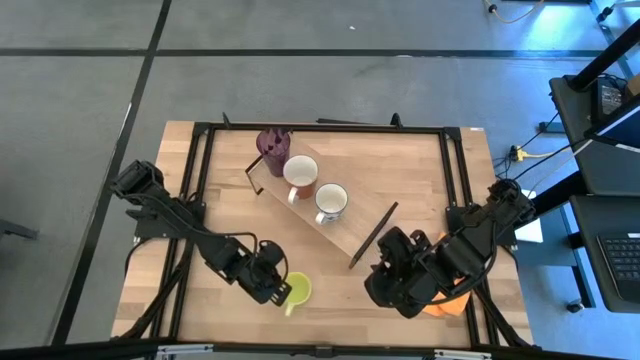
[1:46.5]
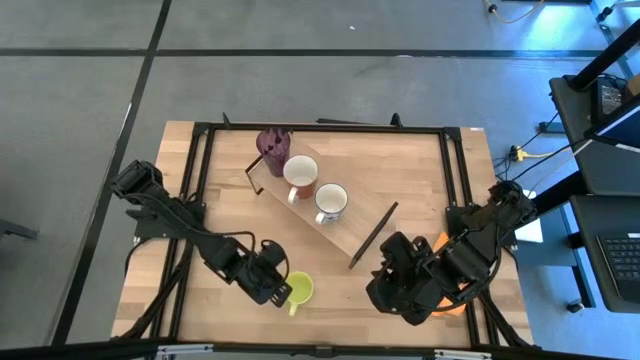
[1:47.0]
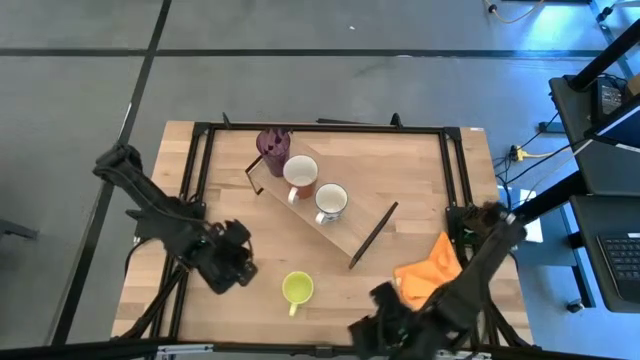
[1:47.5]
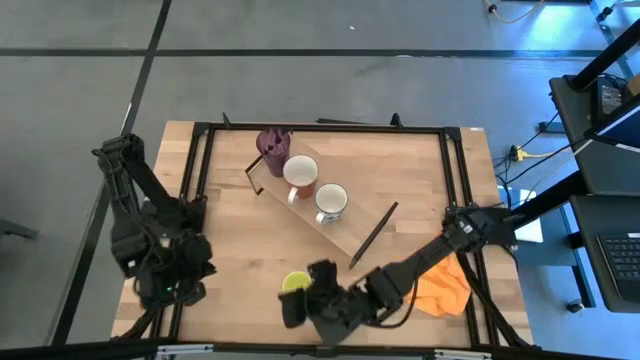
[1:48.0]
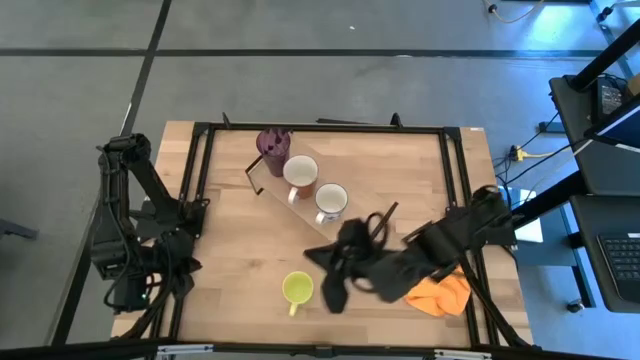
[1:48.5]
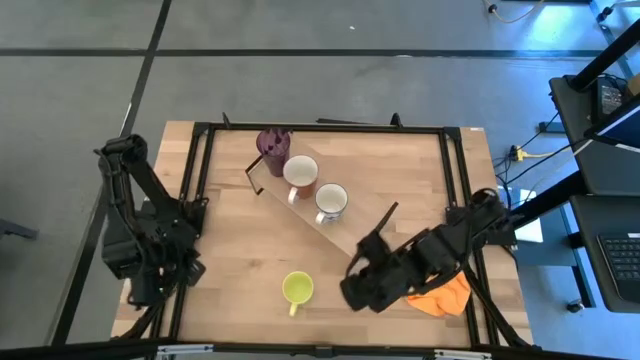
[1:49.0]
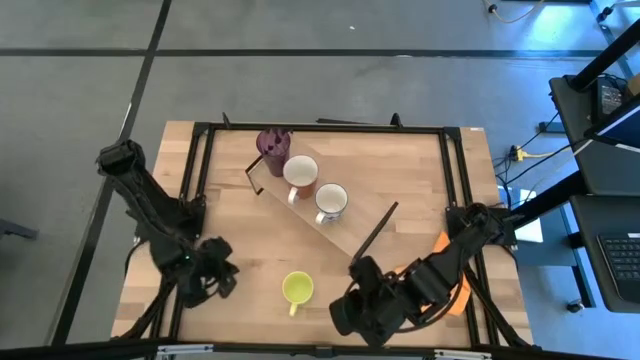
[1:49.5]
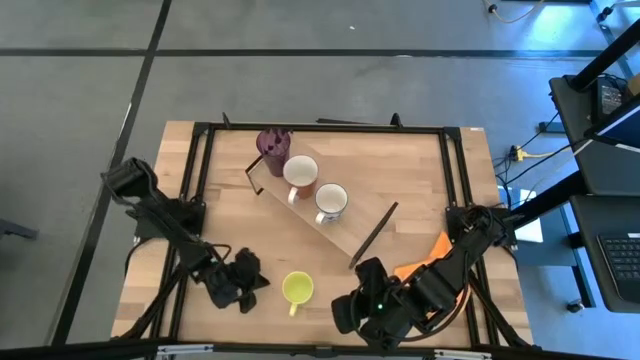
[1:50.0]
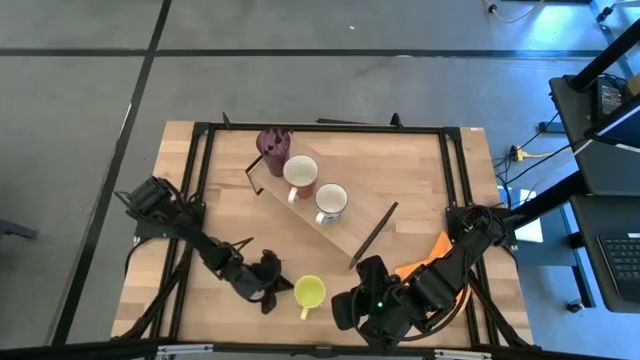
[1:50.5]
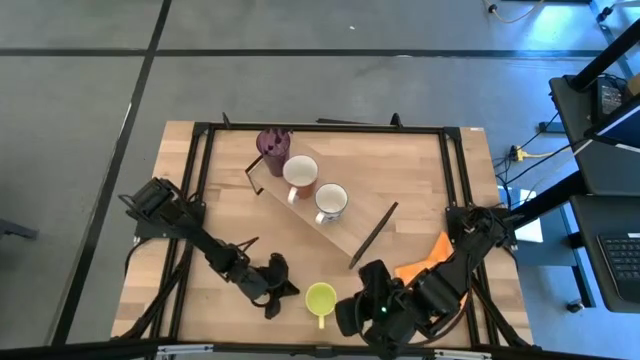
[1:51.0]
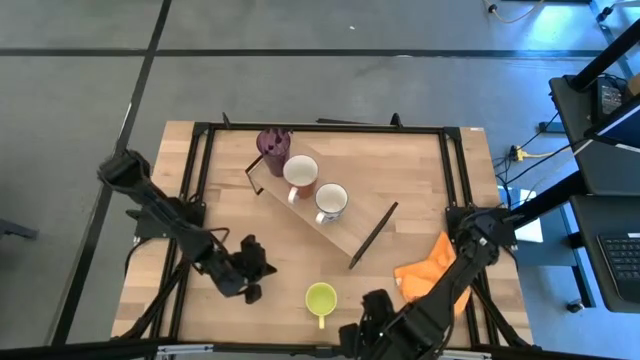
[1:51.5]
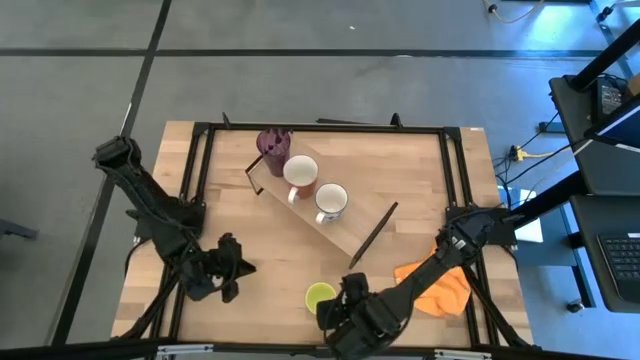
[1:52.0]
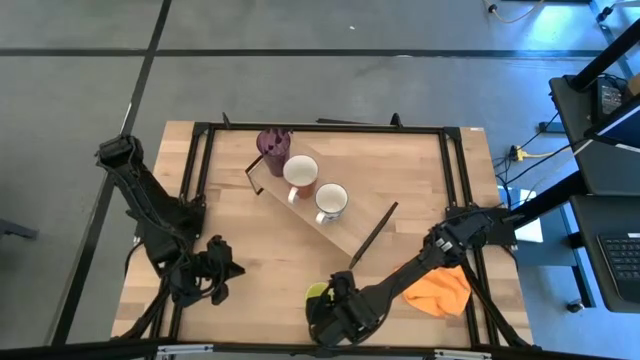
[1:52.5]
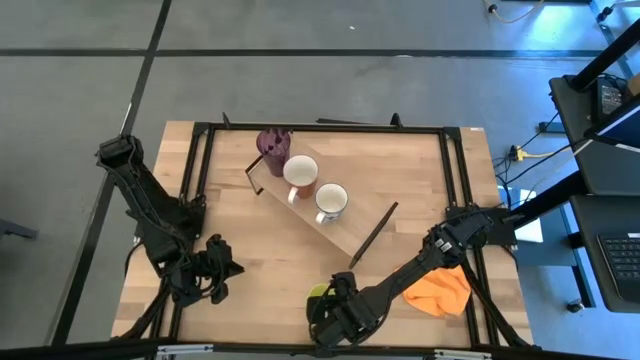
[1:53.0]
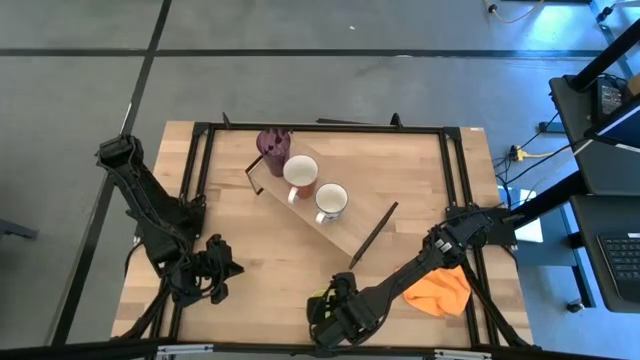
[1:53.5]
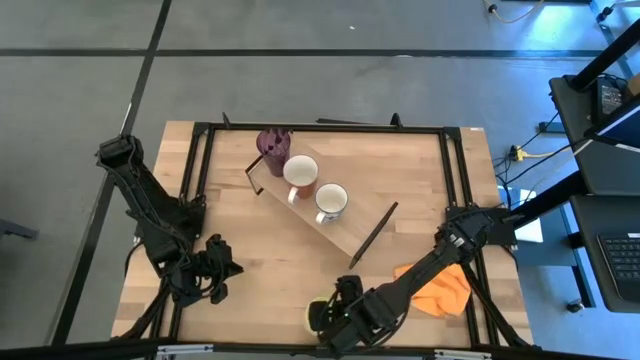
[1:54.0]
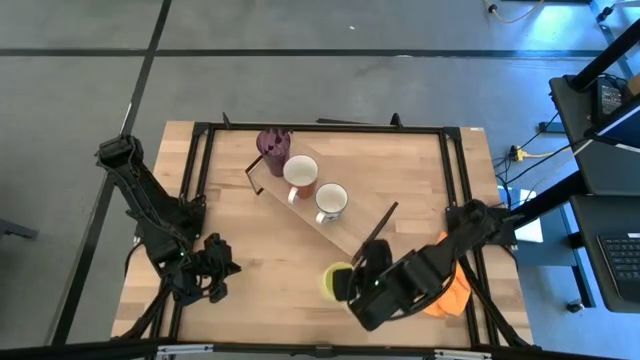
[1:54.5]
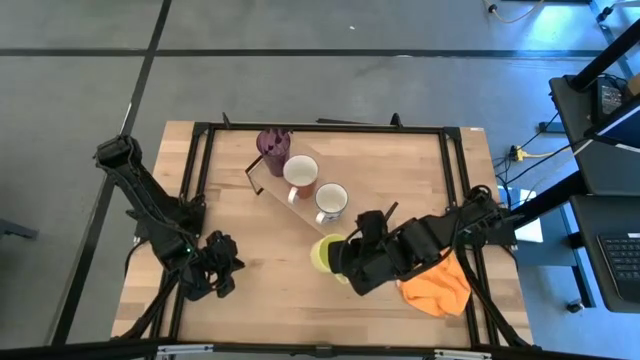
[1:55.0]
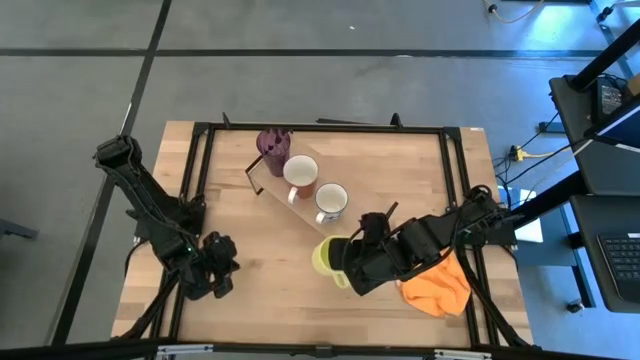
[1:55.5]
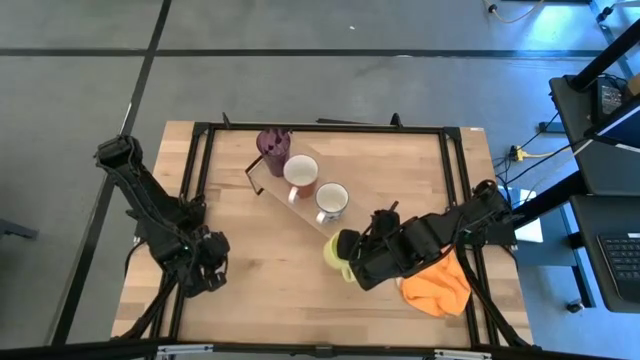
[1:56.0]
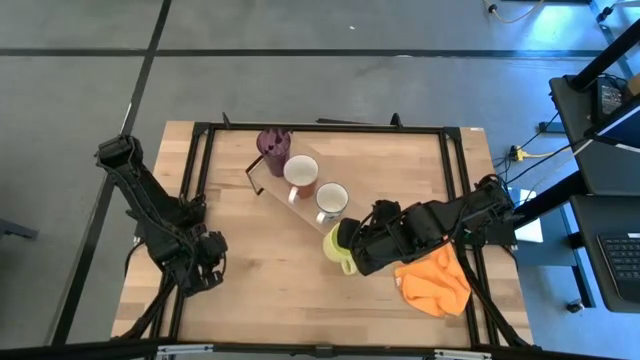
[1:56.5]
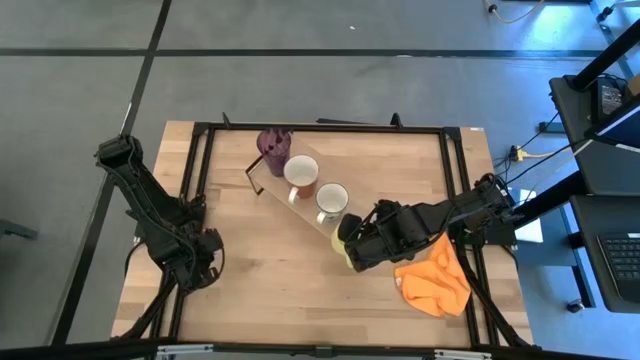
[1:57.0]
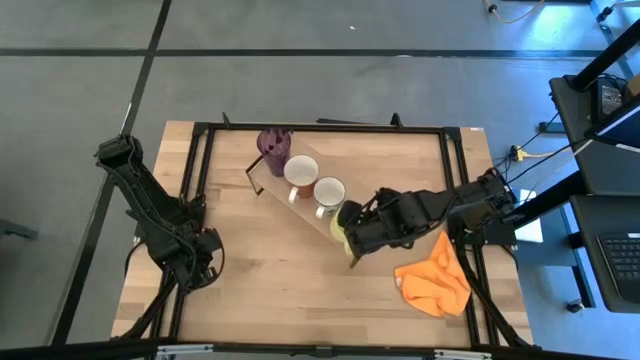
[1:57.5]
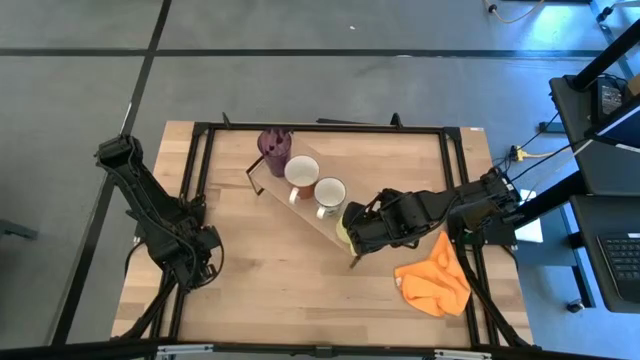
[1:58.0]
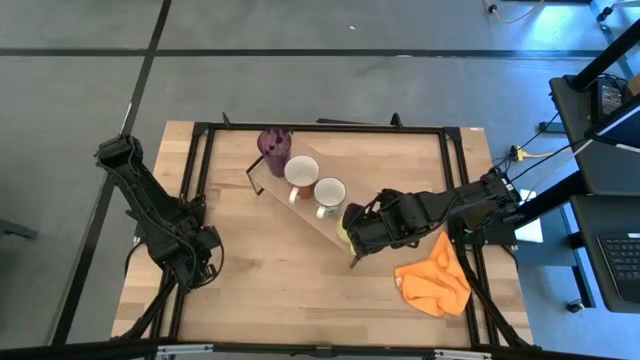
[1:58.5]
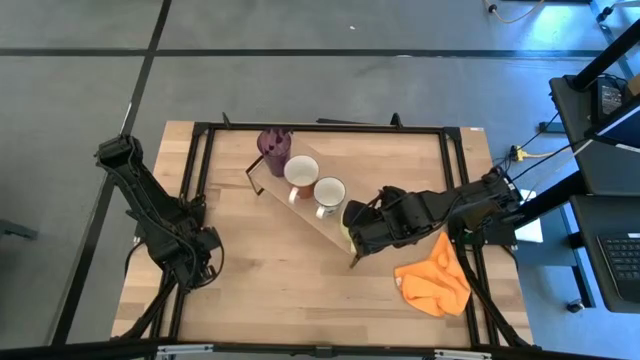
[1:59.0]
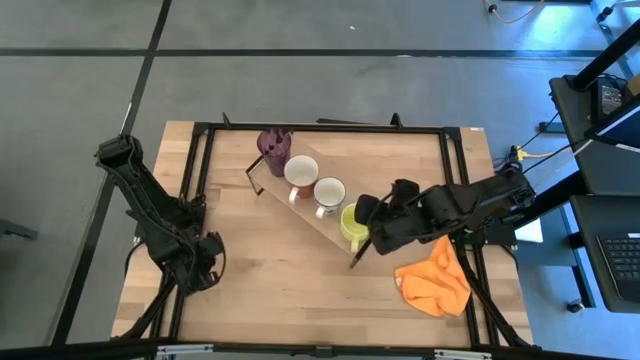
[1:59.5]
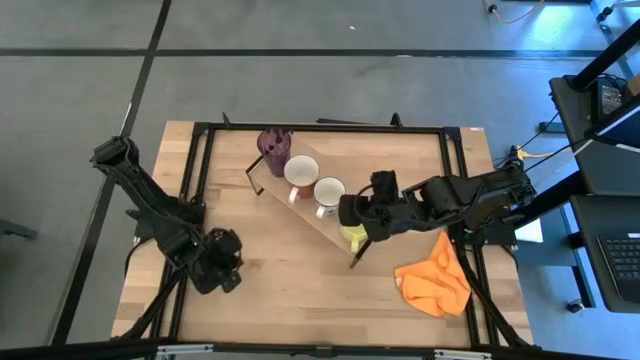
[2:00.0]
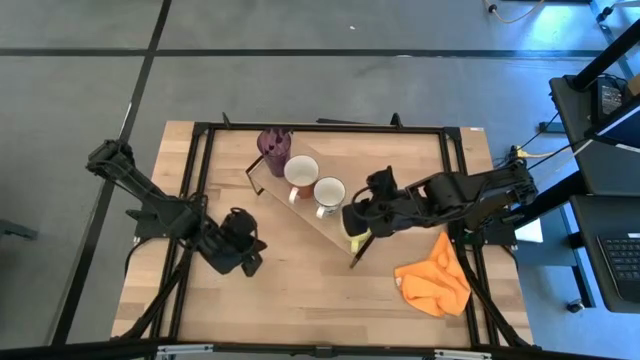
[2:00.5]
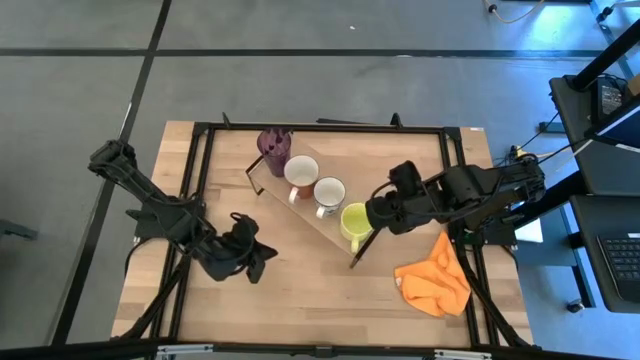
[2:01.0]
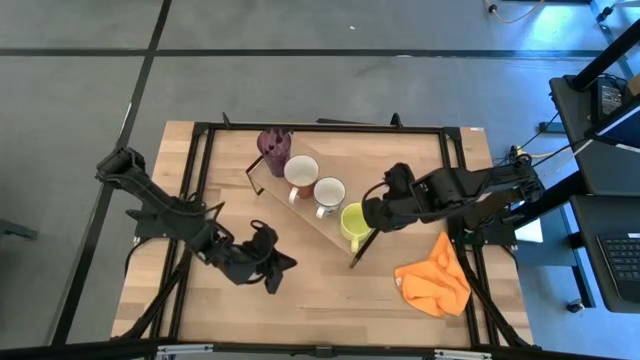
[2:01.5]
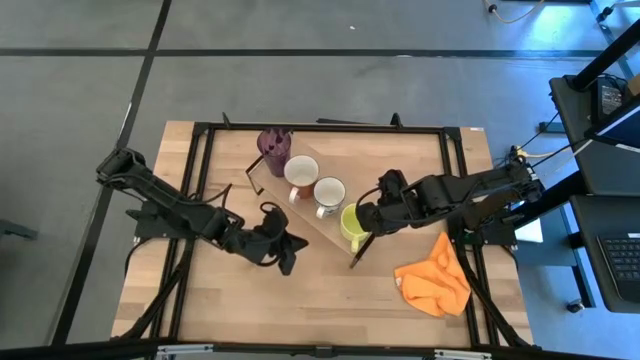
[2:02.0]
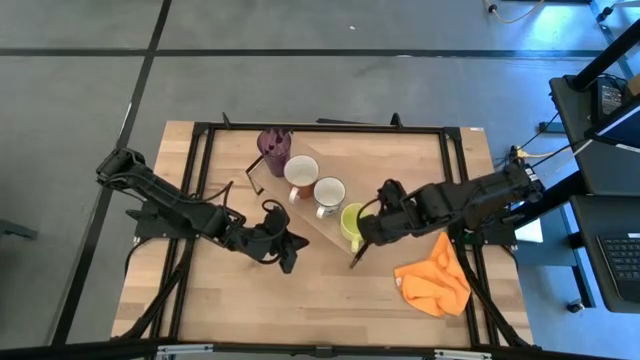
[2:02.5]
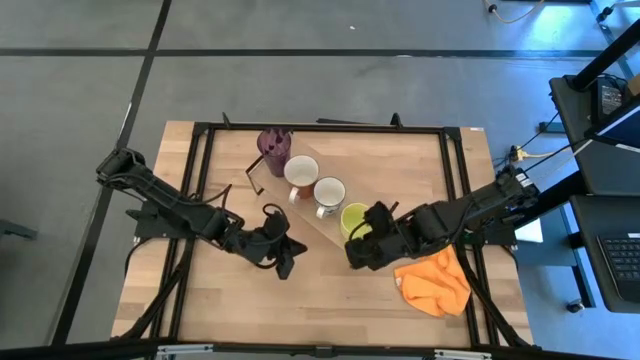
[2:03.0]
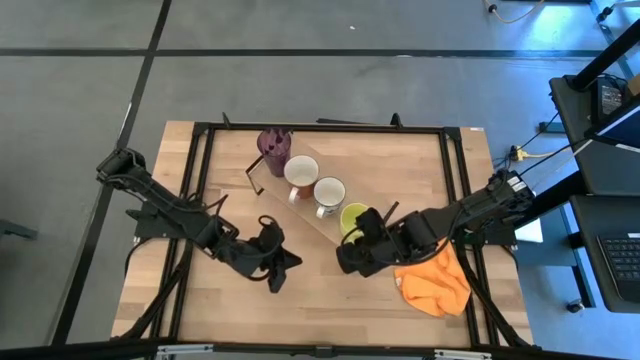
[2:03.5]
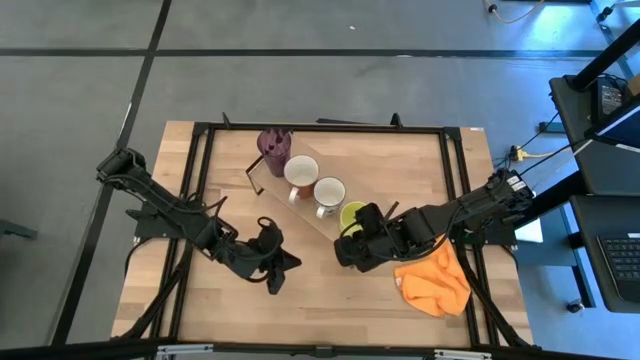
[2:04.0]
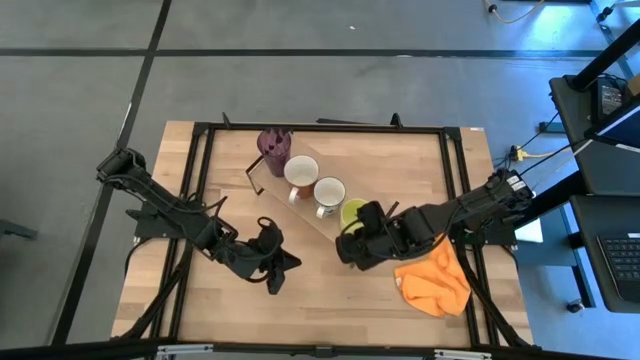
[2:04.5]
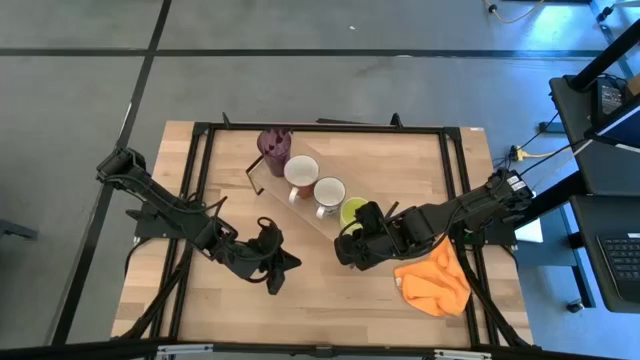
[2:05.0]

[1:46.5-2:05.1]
Task: Stack small to large cups/mugs on shelf
Put the yellow mug on the shelf

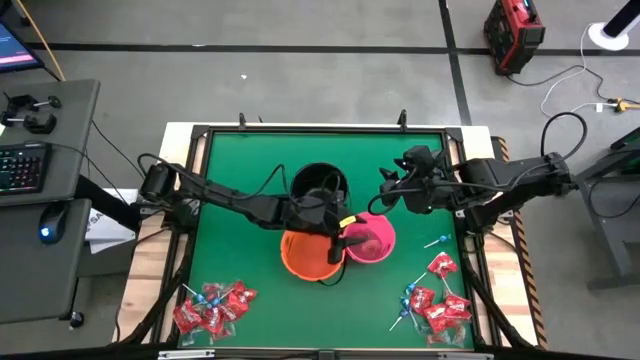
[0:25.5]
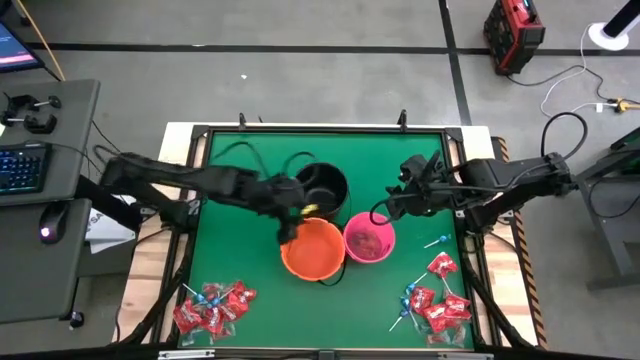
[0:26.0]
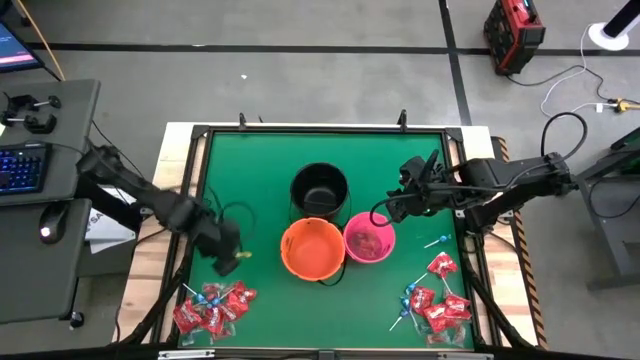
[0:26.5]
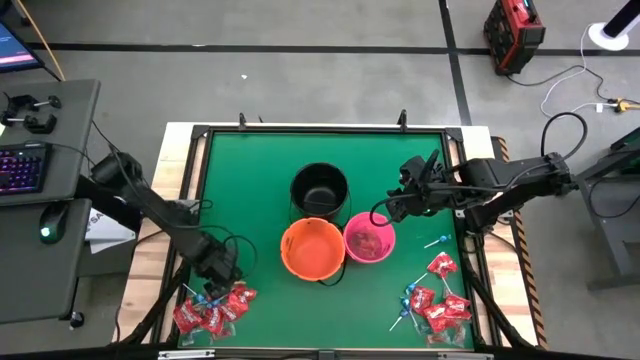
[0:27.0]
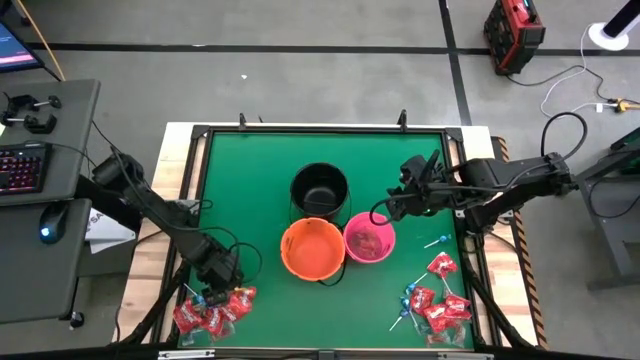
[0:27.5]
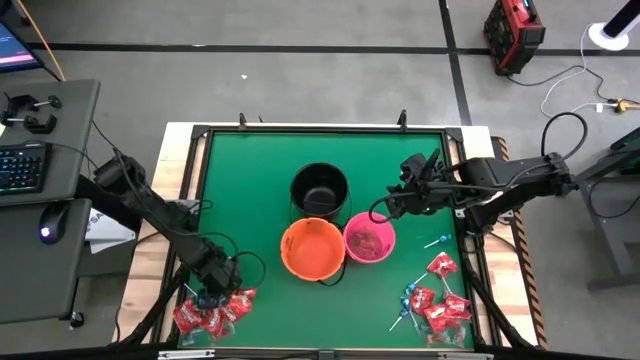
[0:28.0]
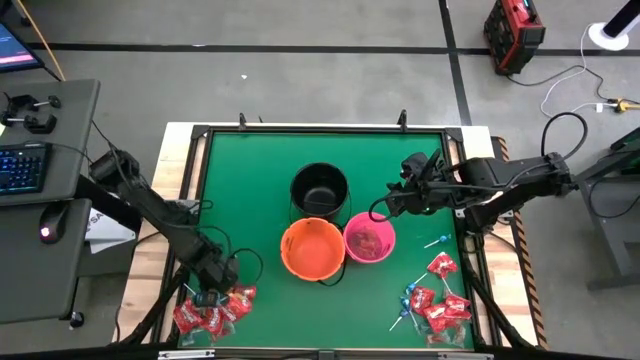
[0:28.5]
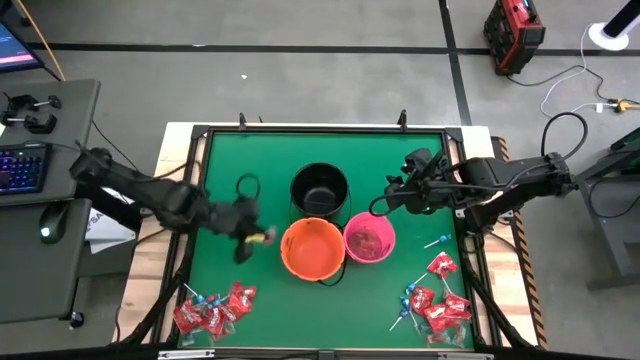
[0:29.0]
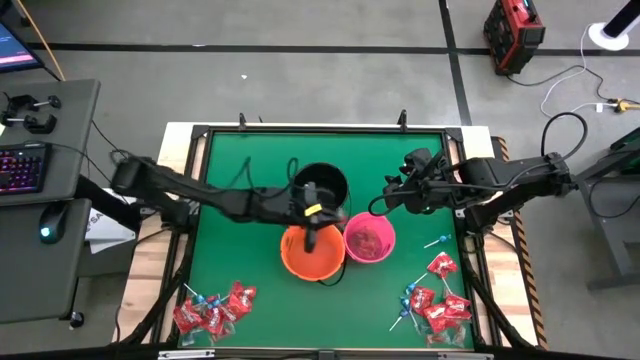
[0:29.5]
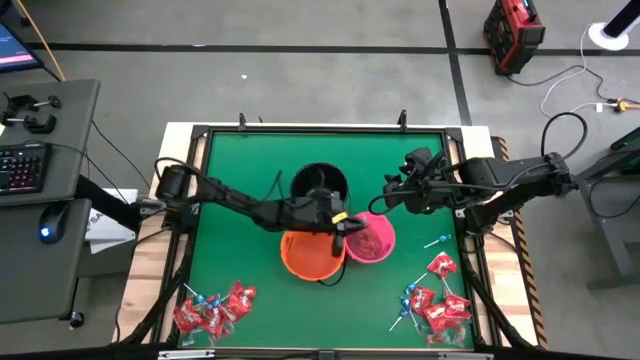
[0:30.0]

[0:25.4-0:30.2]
Task: Sort candy by brand, put in halloween buckets
Put the red gummy into the pink bucket
